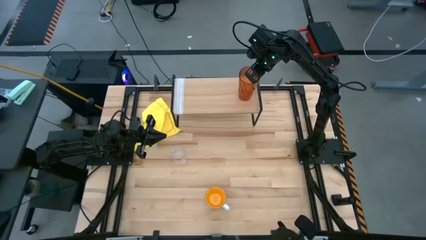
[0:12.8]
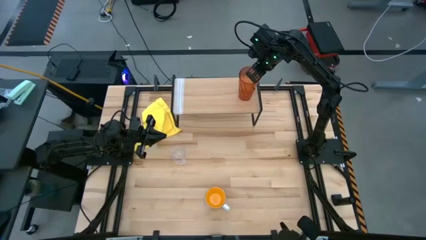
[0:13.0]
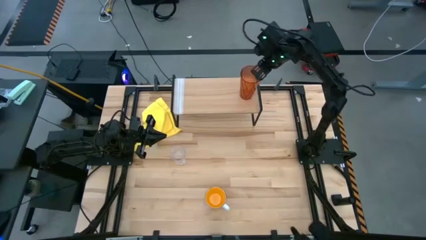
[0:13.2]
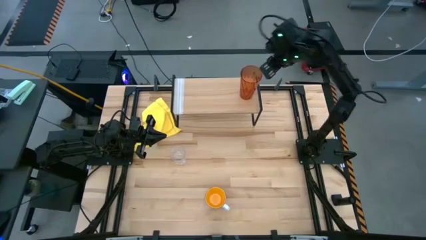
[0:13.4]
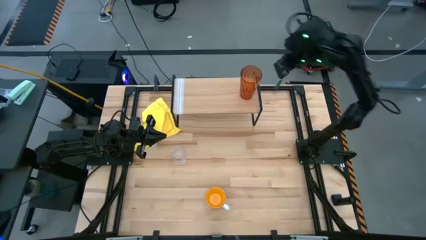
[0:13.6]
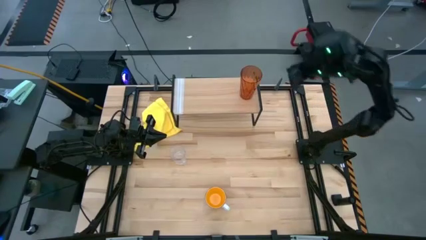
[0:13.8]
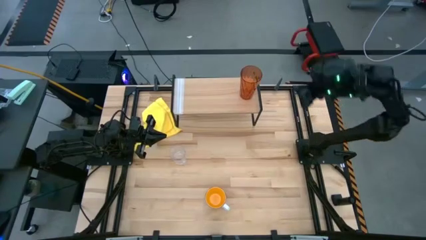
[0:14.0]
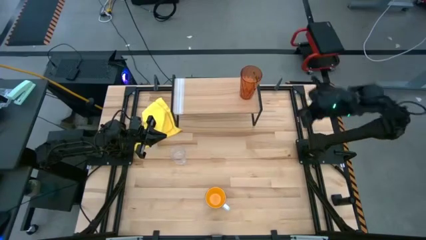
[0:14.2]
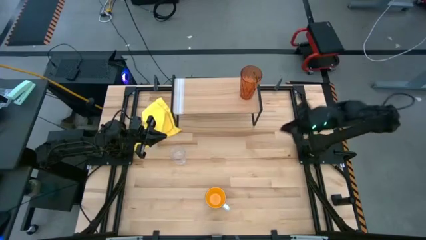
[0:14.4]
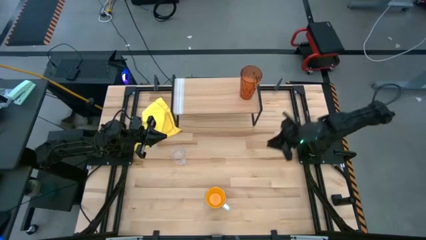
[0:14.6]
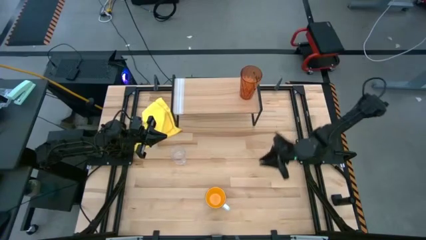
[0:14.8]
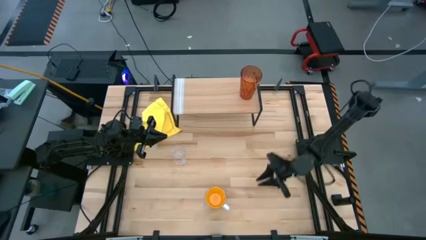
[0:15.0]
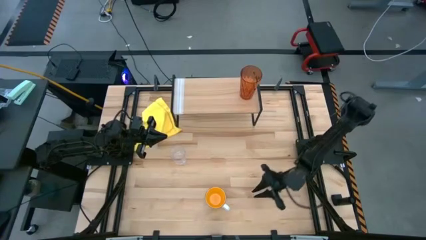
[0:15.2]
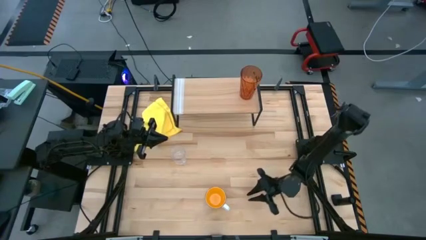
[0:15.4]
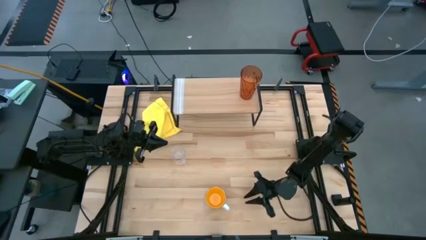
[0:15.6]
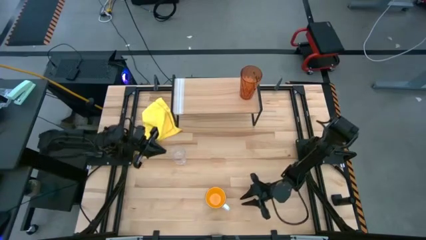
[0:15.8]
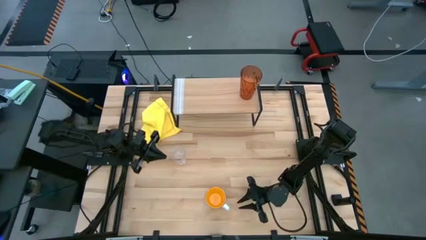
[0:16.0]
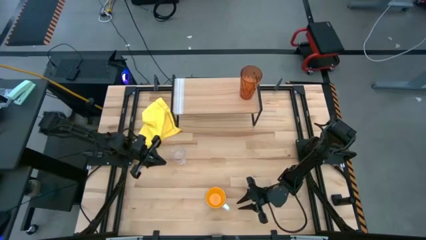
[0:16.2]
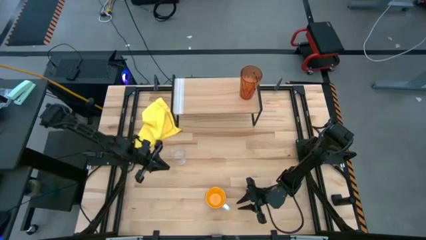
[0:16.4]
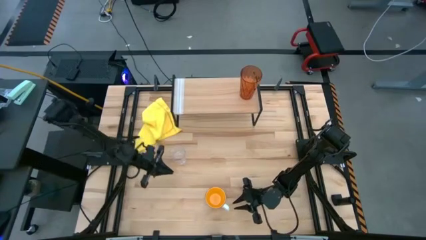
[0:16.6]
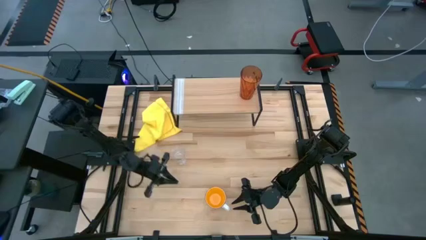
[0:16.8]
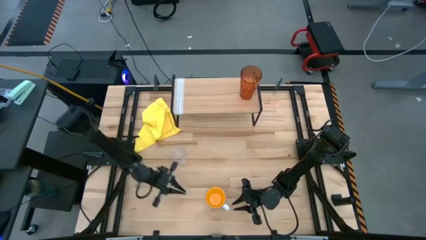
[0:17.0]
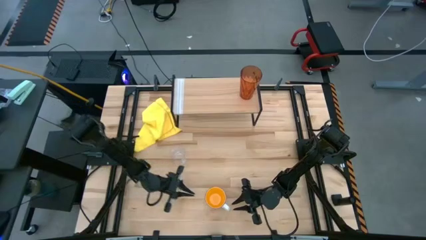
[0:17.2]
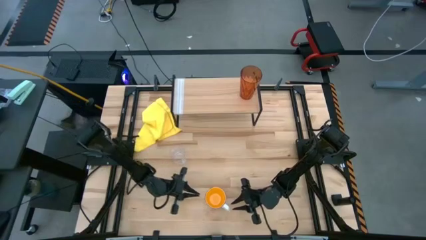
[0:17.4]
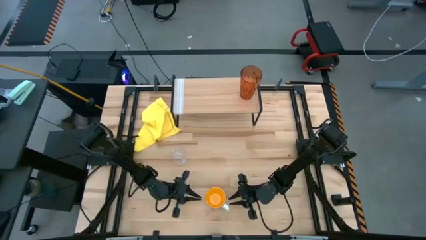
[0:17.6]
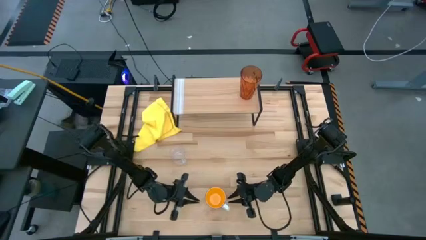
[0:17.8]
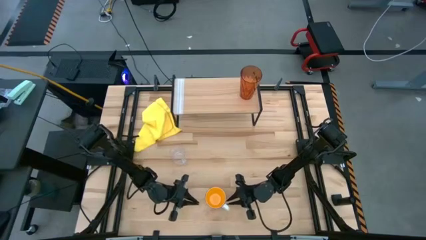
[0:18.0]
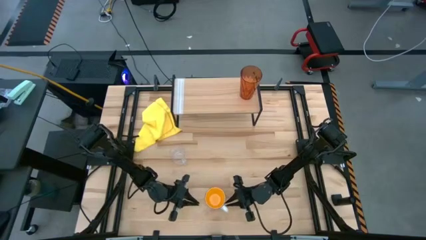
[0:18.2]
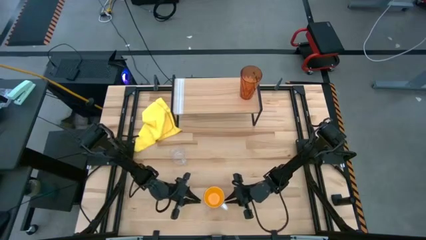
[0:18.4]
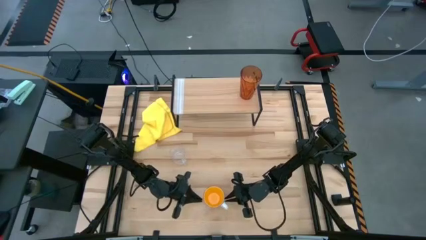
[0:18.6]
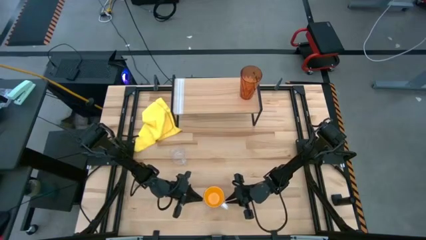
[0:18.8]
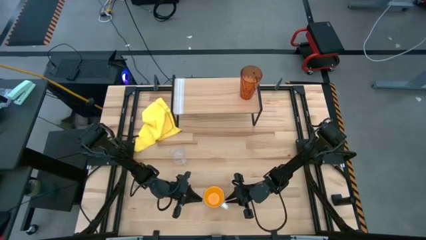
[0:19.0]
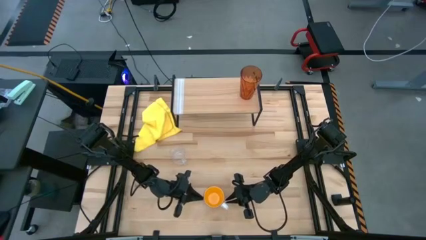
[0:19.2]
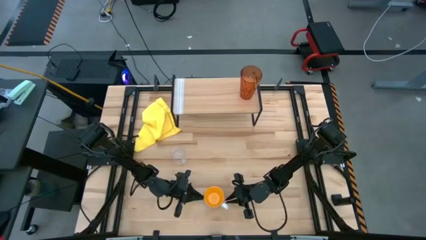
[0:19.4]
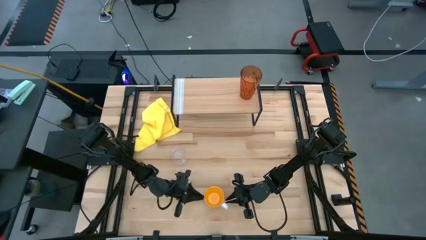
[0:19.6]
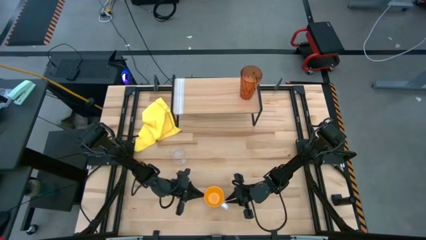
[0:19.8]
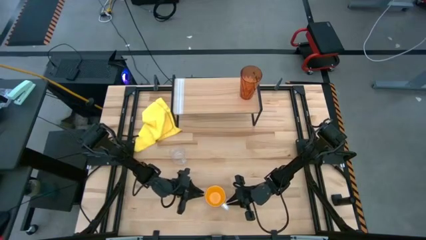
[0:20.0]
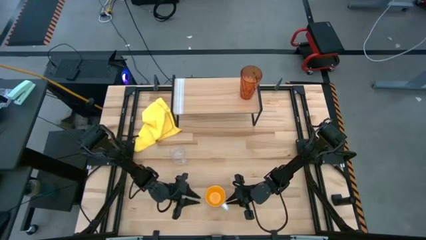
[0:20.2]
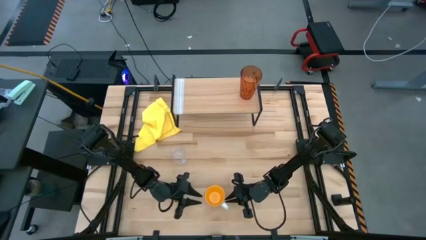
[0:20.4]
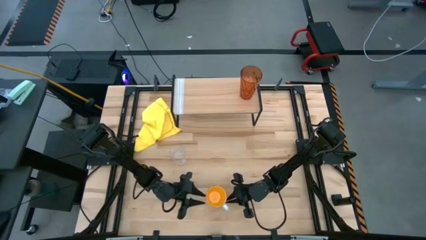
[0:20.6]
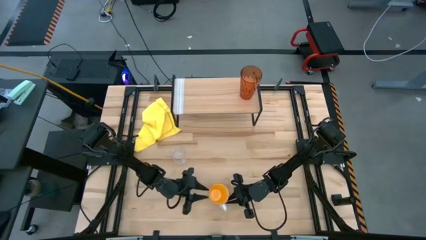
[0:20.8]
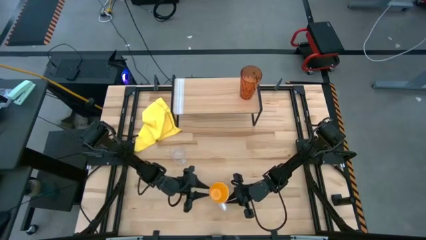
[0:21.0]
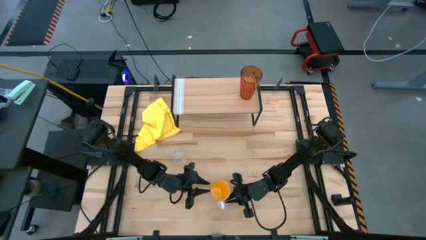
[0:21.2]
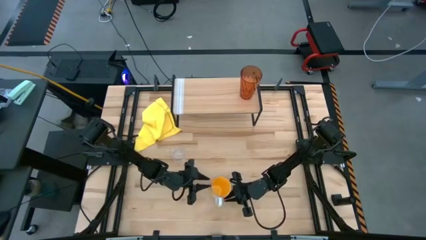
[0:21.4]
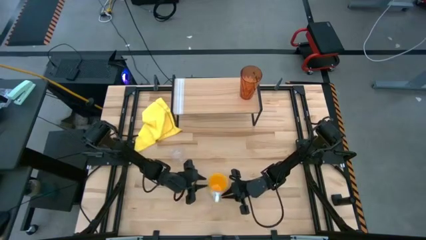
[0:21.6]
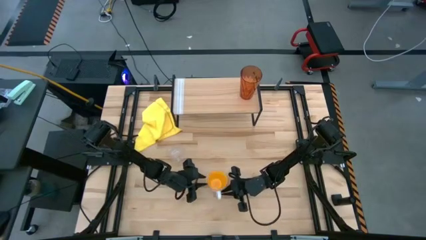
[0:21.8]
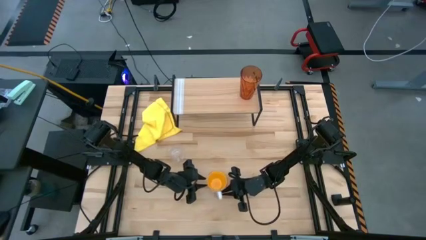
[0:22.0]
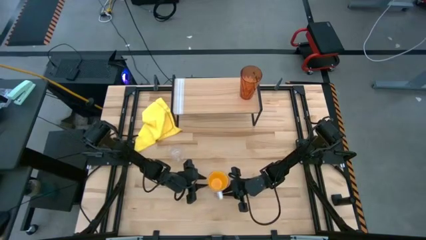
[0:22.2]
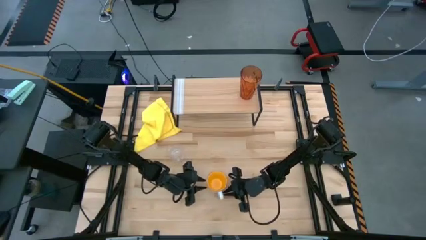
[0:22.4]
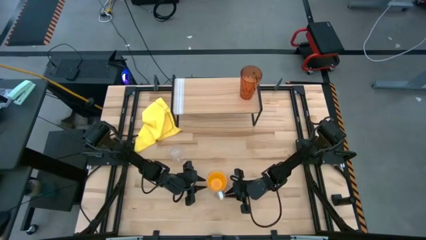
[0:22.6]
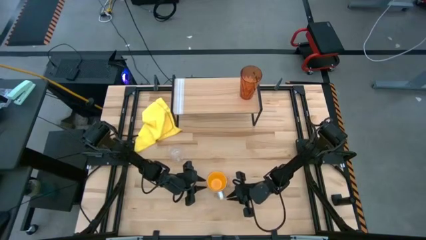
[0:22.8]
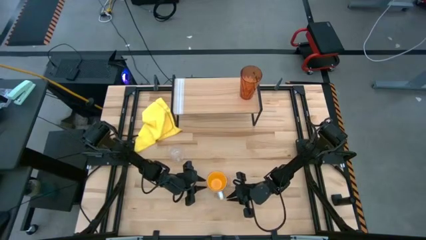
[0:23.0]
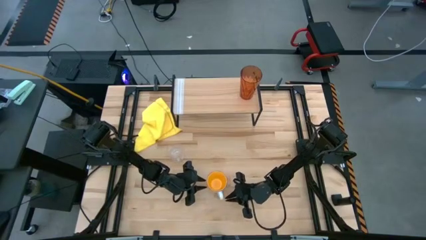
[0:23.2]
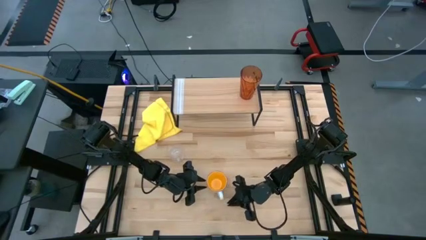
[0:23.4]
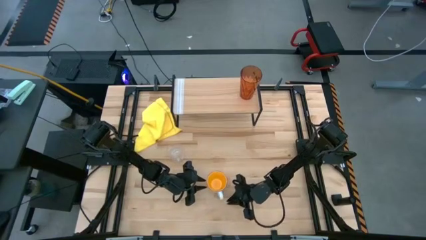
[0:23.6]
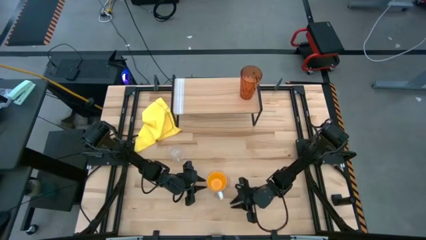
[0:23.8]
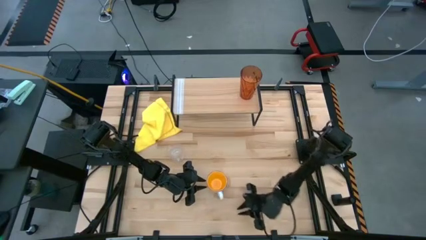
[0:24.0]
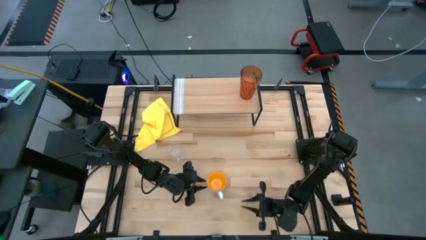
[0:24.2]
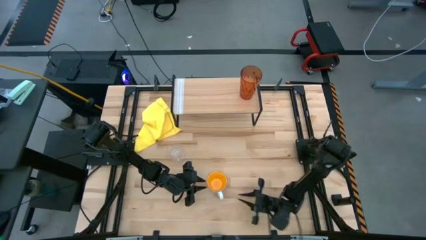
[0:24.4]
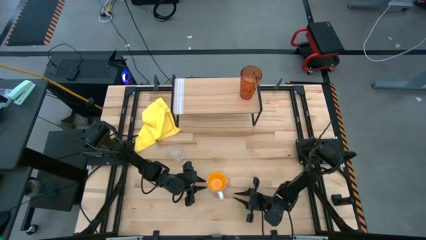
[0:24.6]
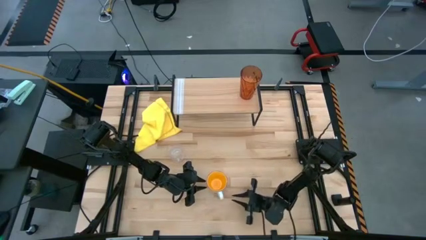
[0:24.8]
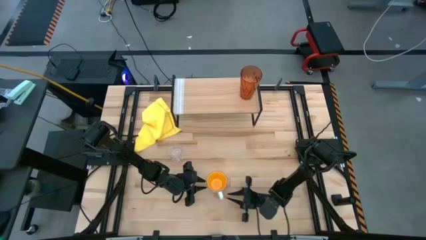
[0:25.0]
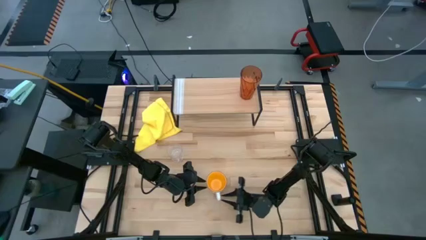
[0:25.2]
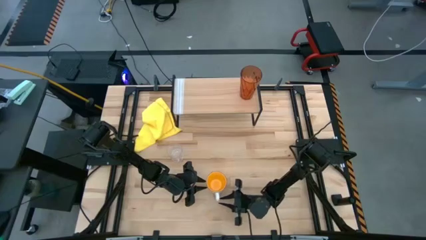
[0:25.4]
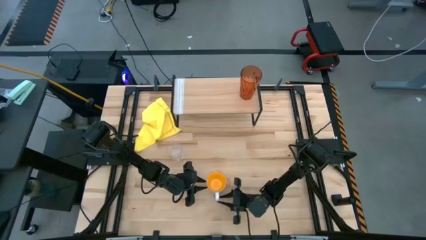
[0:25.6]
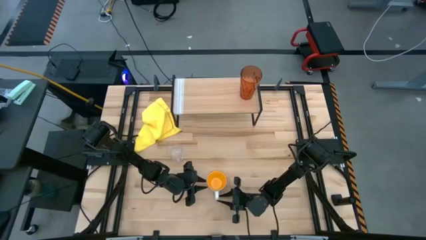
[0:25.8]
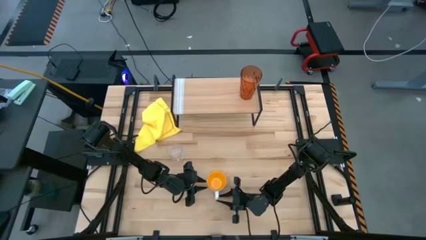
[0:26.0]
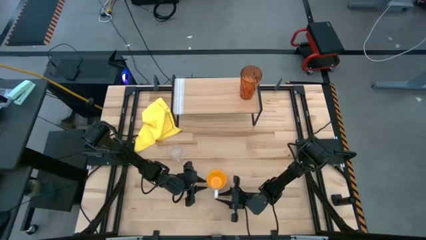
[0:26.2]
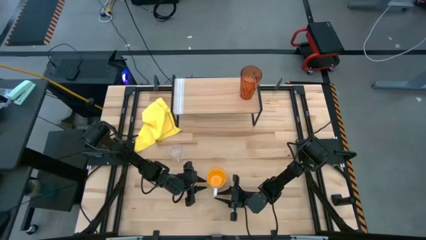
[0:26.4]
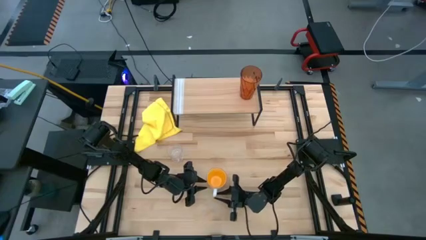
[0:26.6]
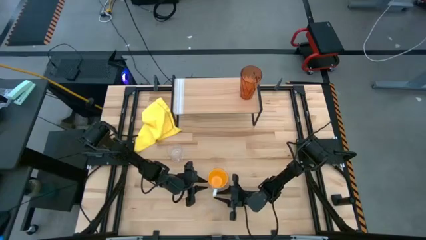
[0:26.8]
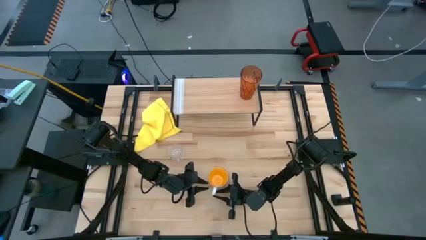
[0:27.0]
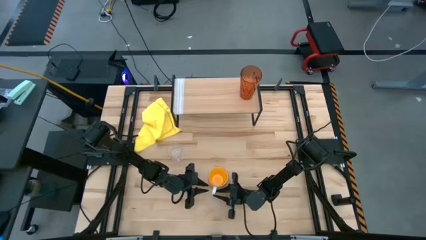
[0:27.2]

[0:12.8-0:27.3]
Task: Stack small to large cups/mugs on shelf
Put the yellow mug on the shelf

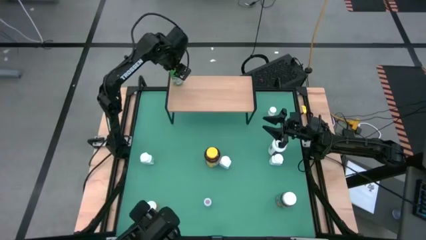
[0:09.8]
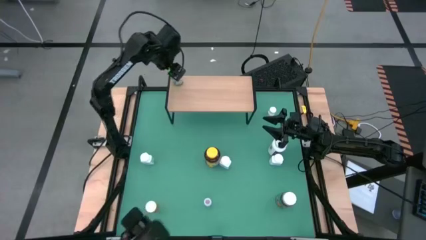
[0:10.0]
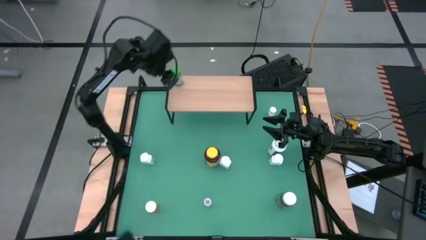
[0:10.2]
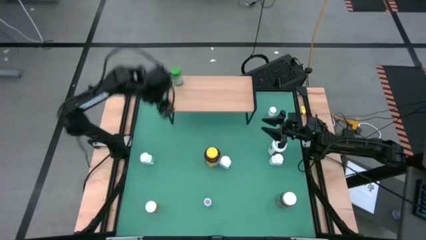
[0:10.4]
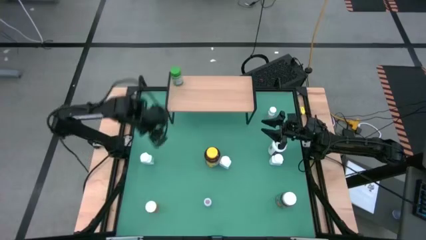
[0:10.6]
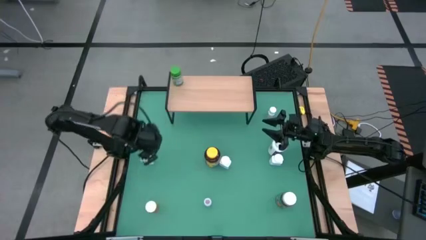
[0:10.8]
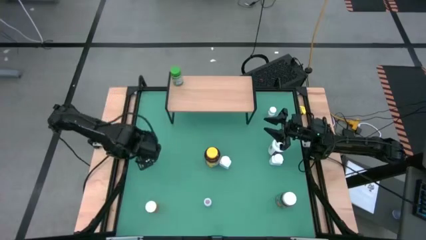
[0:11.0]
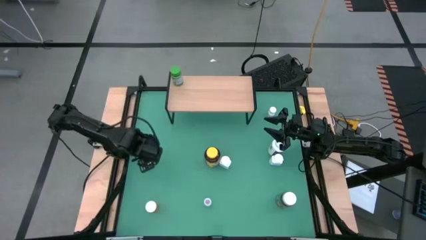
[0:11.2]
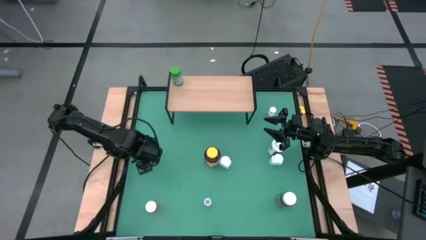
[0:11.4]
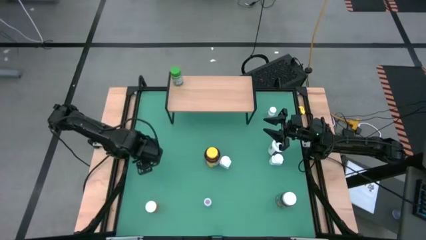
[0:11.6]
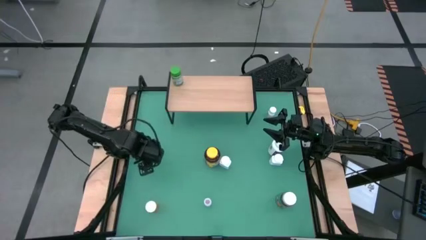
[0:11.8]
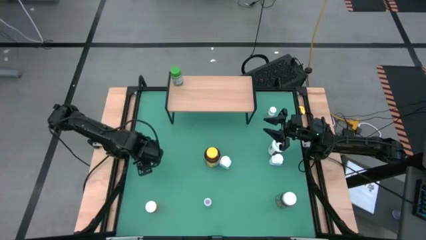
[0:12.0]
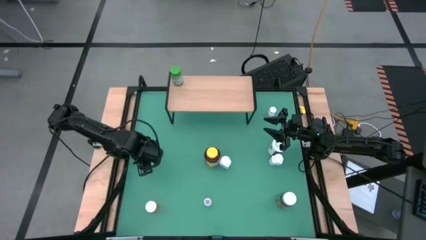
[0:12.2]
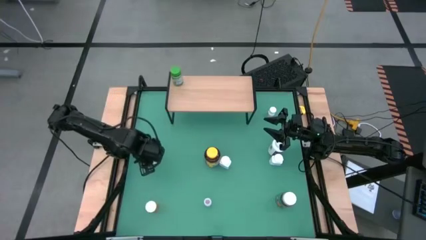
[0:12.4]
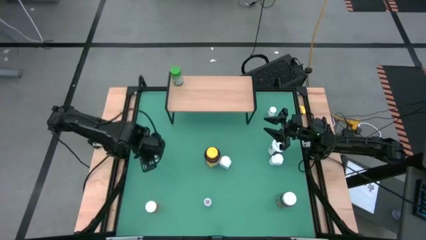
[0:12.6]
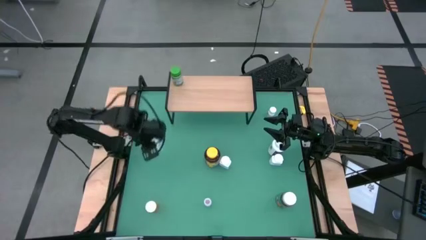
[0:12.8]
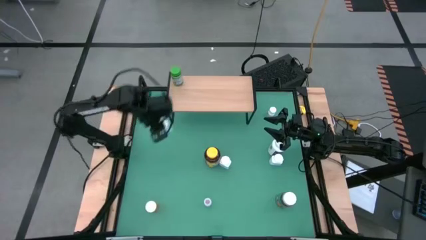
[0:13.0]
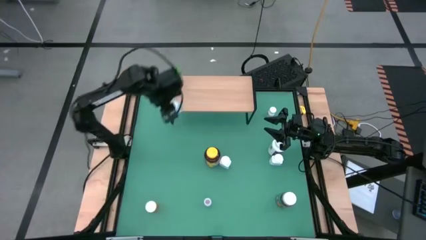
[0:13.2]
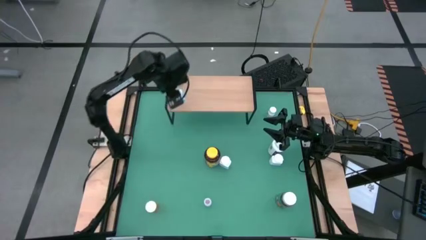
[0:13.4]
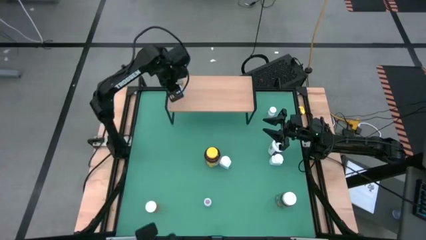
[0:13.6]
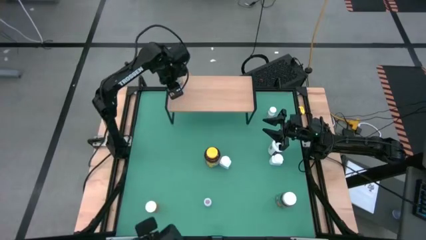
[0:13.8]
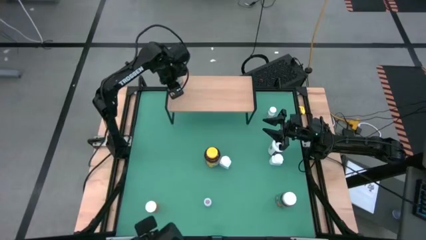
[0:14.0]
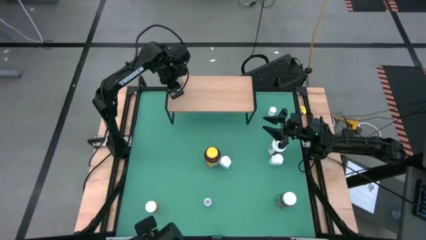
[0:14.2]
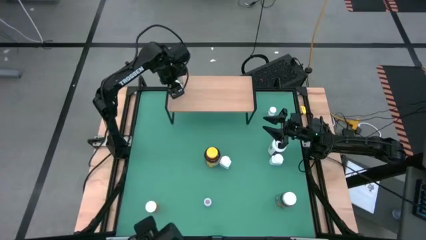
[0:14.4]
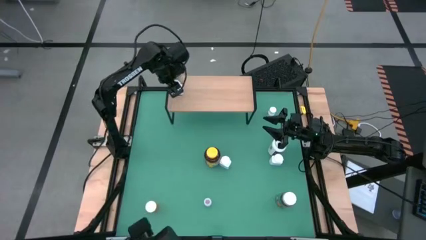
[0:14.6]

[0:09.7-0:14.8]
Task: Pick and place medicine bottles onto shelf by color
Put the left white and blue pill bottle on the shelf
